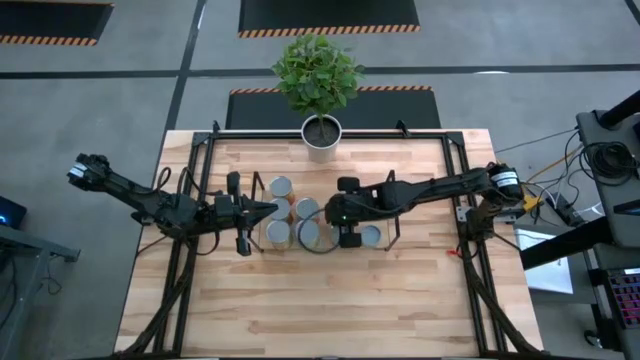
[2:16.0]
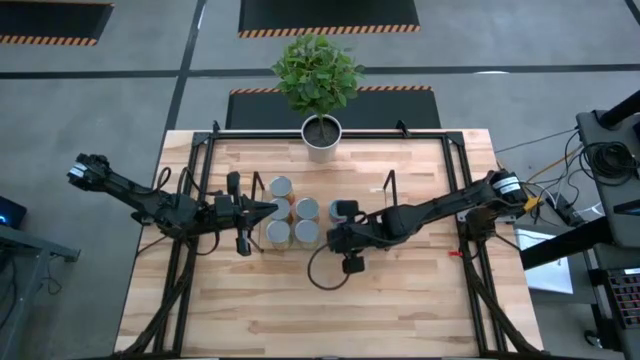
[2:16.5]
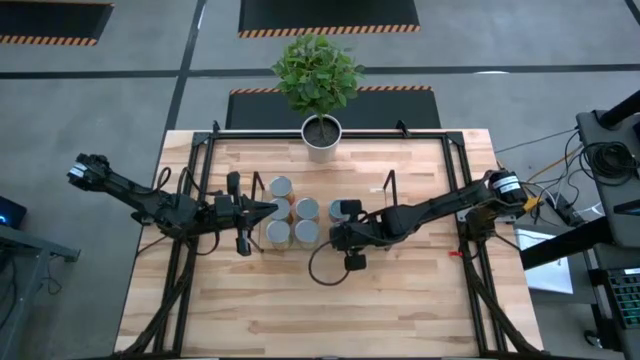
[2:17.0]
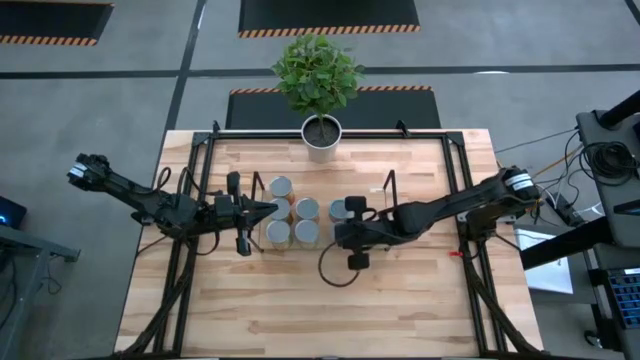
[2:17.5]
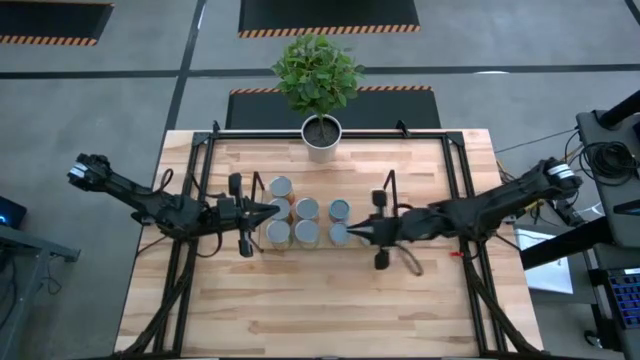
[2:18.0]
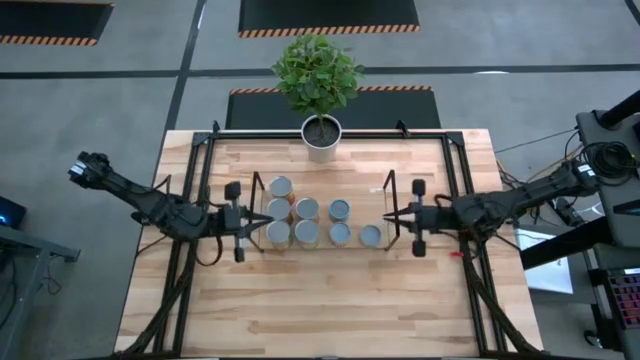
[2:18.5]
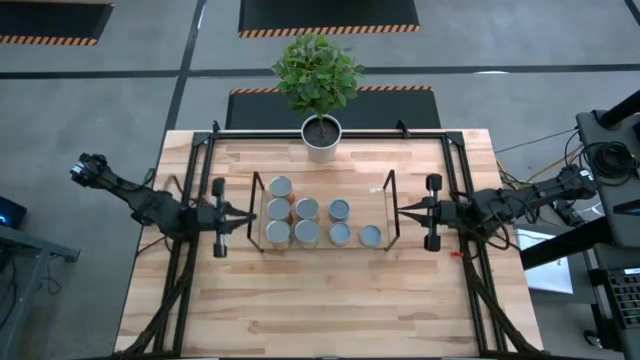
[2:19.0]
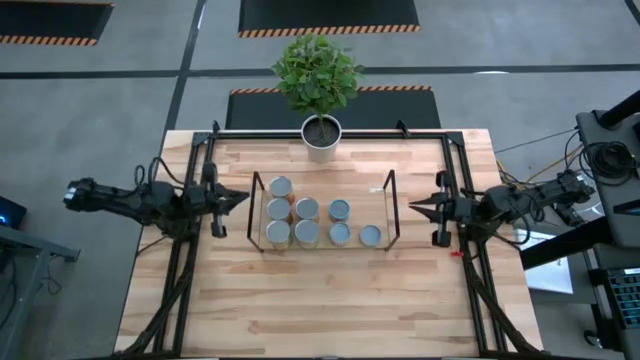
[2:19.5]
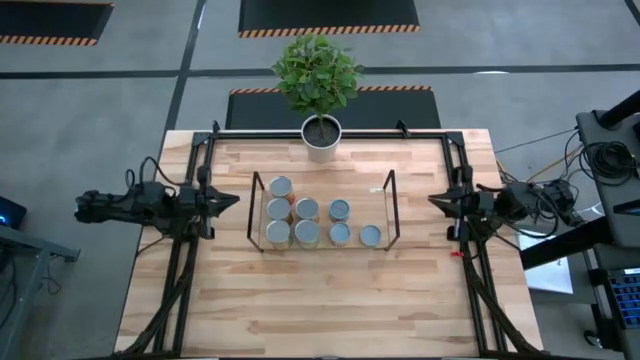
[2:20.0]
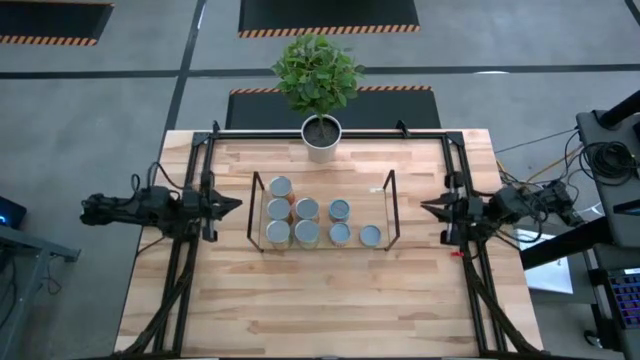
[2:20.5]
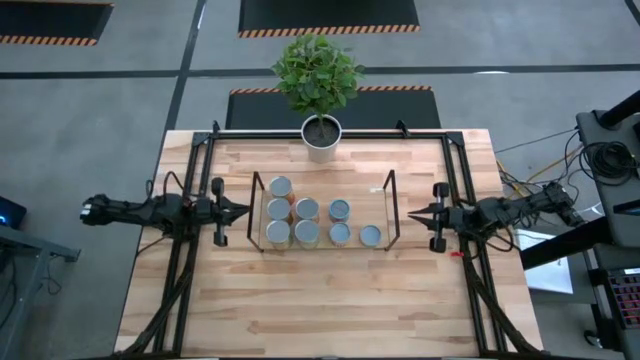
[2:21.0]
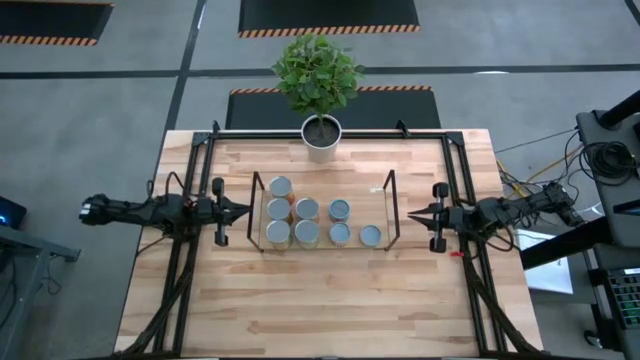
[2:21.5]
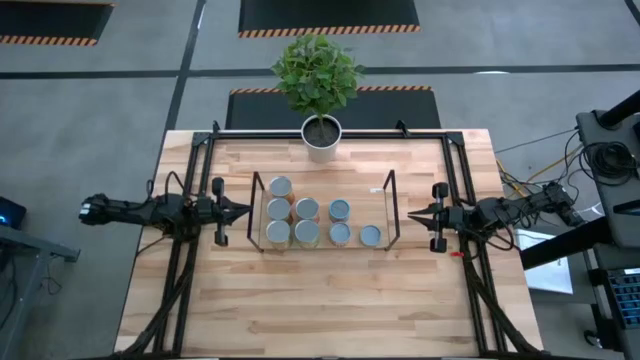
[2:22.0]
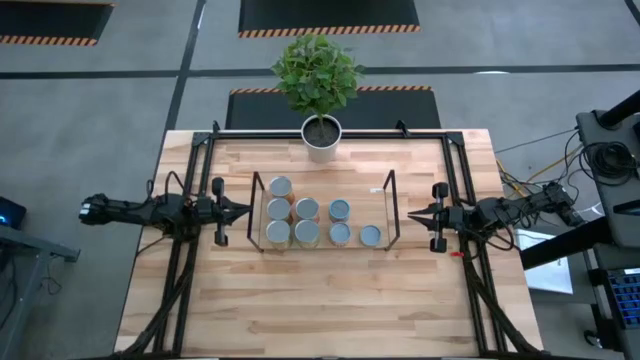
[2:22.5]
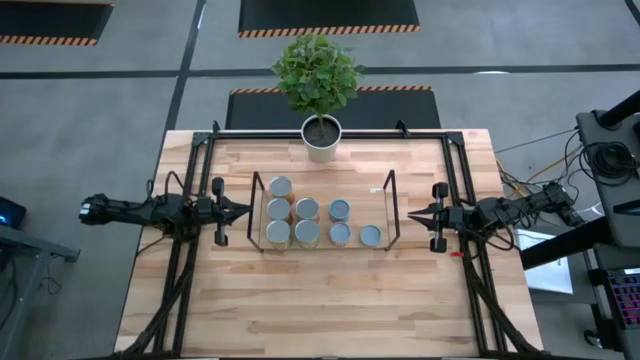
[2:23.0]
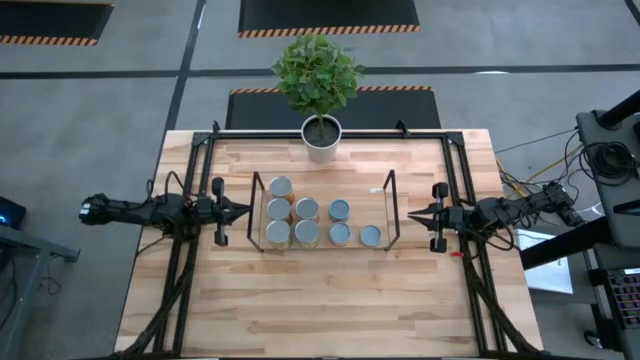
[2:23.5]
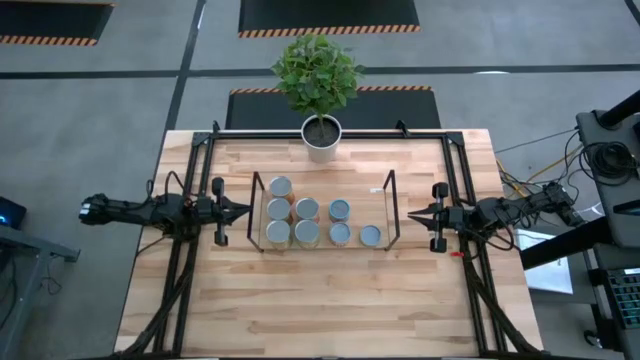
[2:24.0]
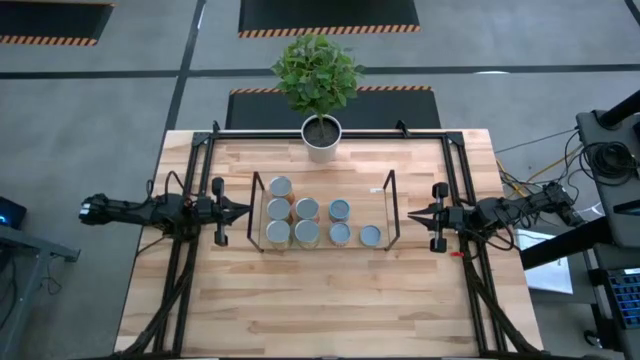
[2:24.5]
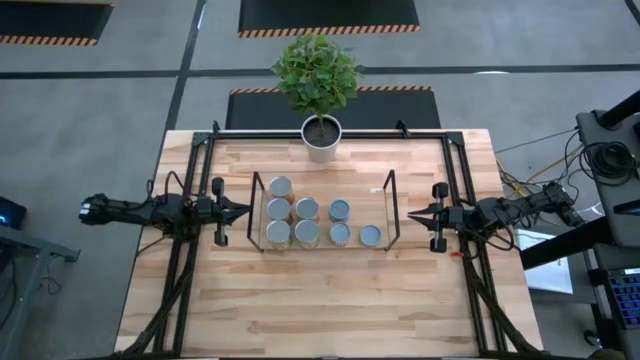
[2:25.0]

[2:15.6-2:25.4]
Task: Pick and place cans onto a shelf
Return to Home Position

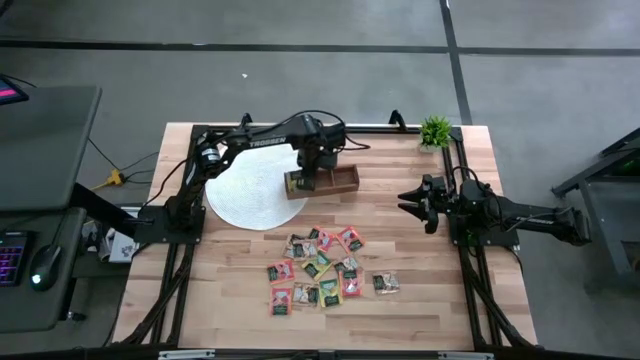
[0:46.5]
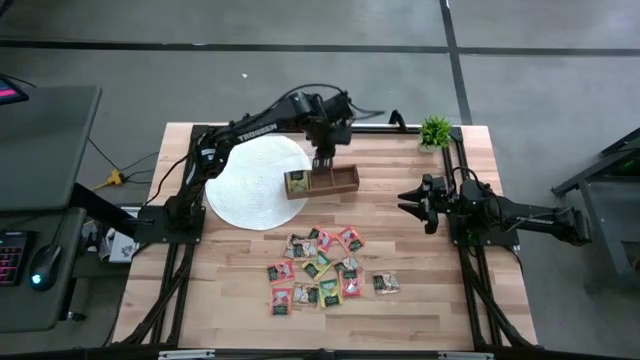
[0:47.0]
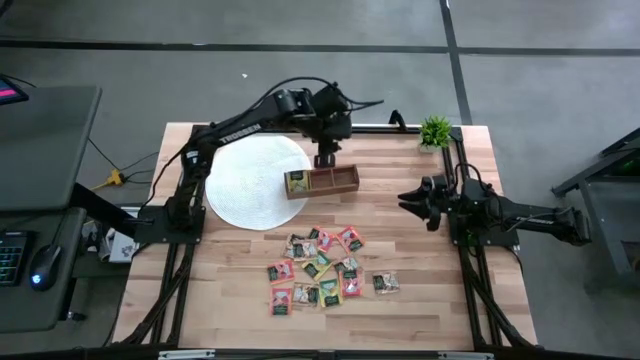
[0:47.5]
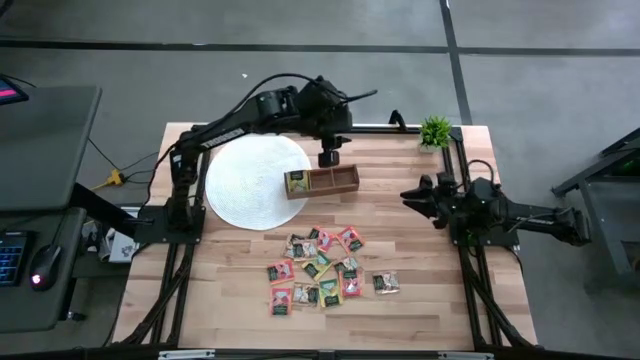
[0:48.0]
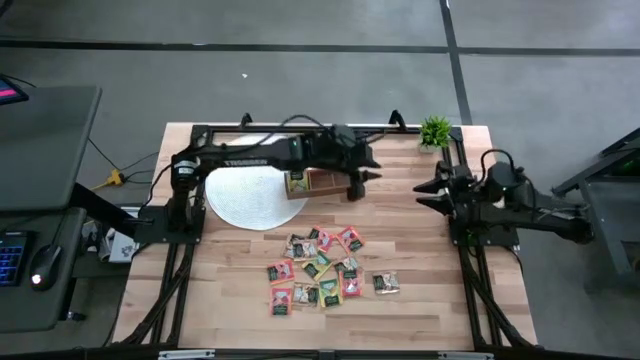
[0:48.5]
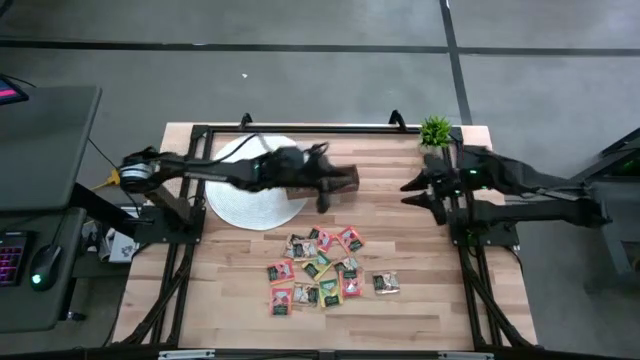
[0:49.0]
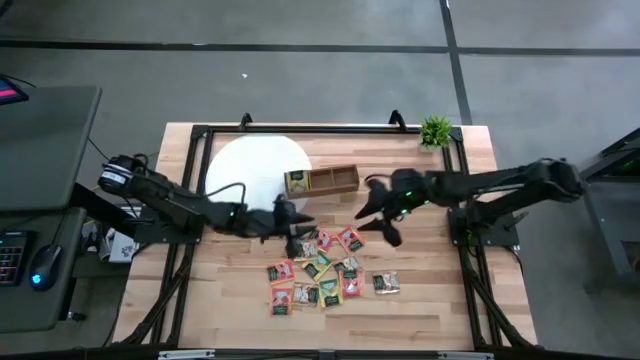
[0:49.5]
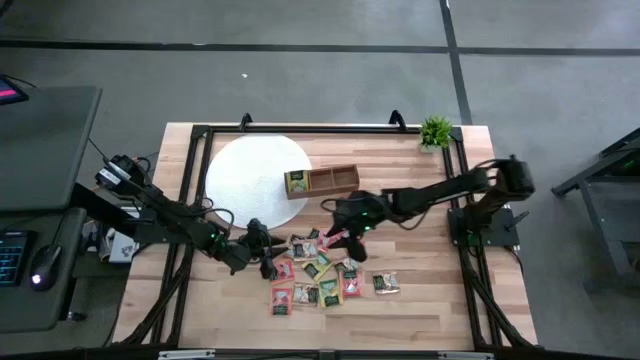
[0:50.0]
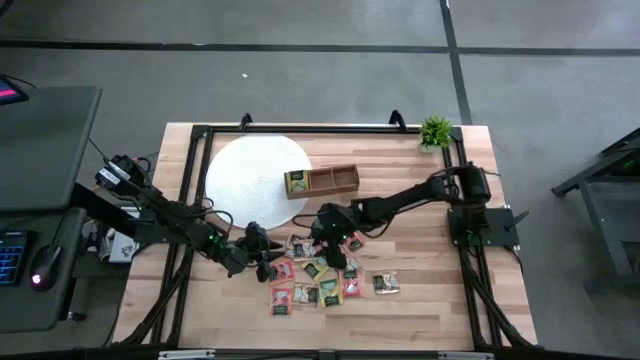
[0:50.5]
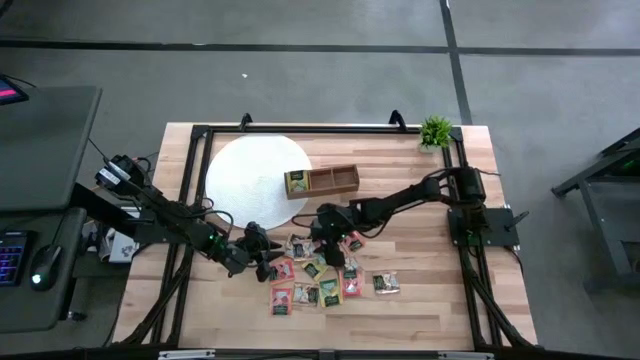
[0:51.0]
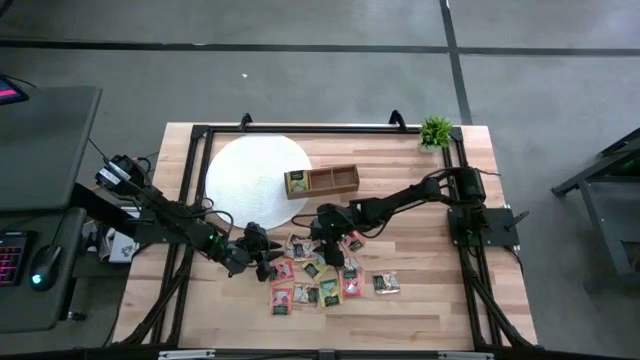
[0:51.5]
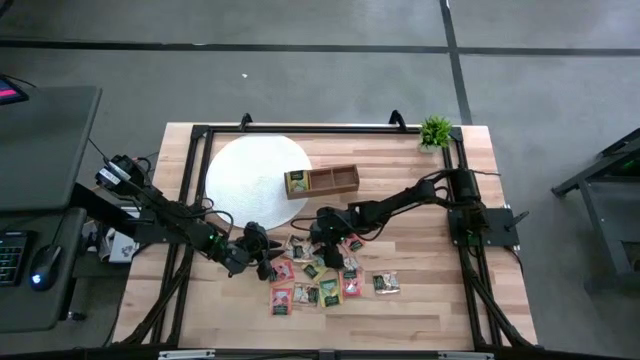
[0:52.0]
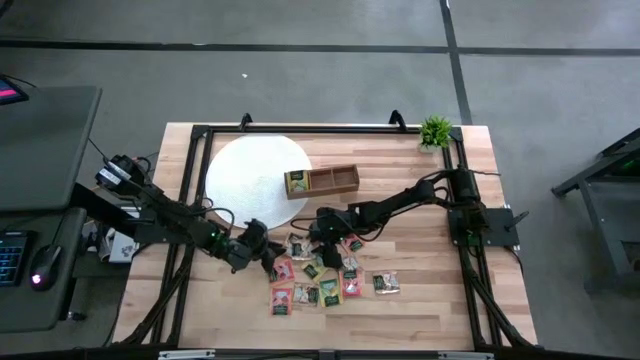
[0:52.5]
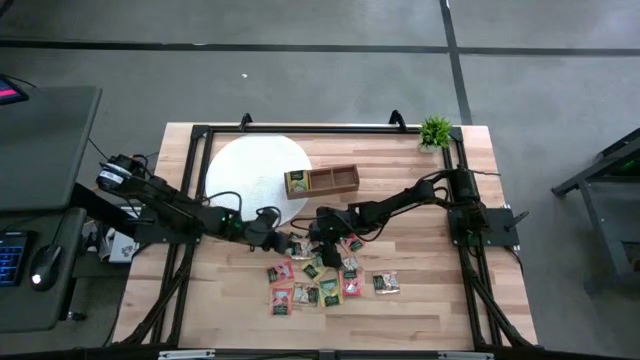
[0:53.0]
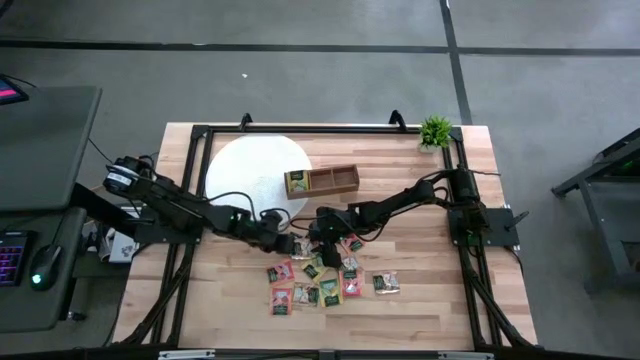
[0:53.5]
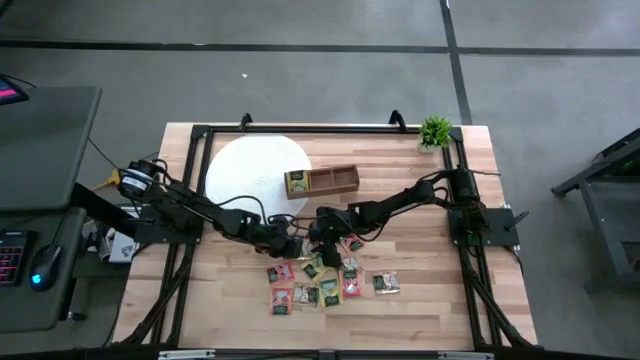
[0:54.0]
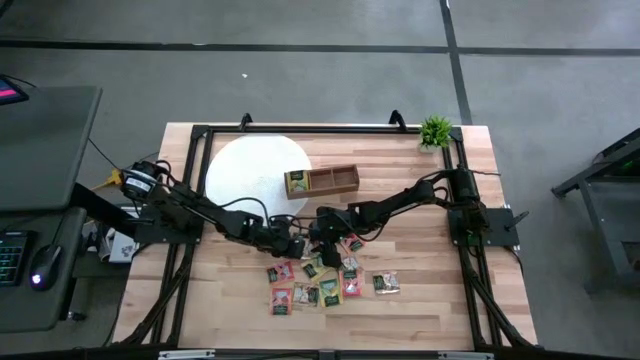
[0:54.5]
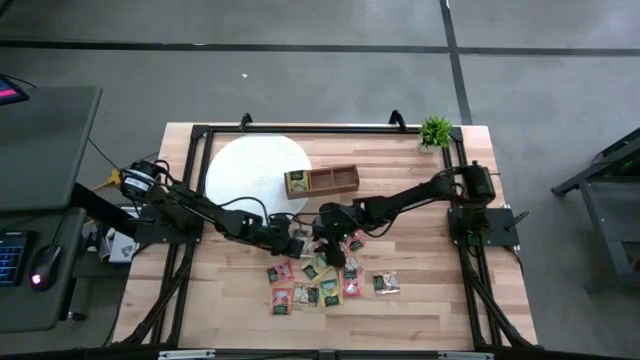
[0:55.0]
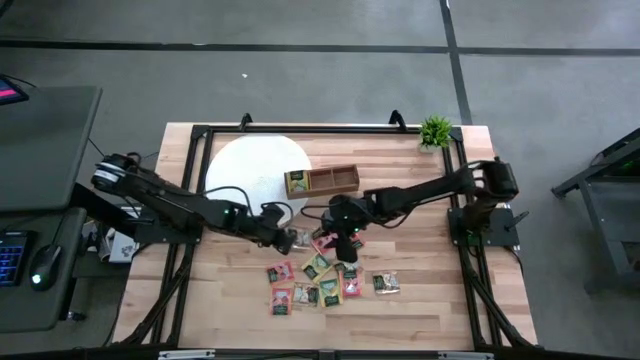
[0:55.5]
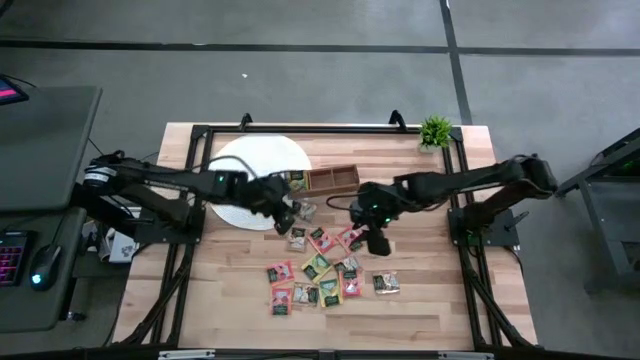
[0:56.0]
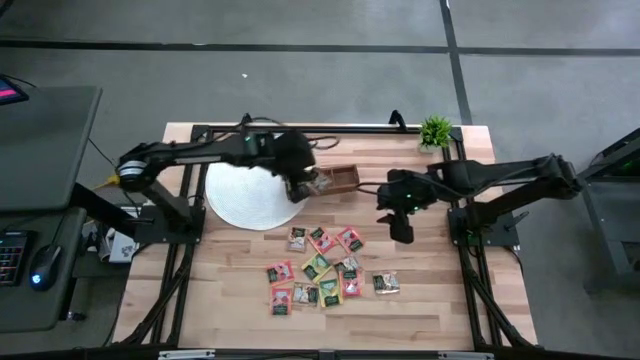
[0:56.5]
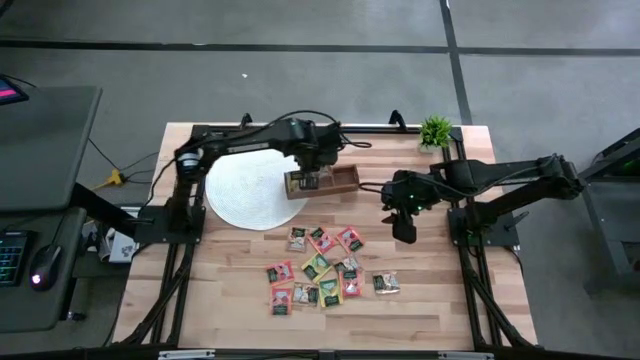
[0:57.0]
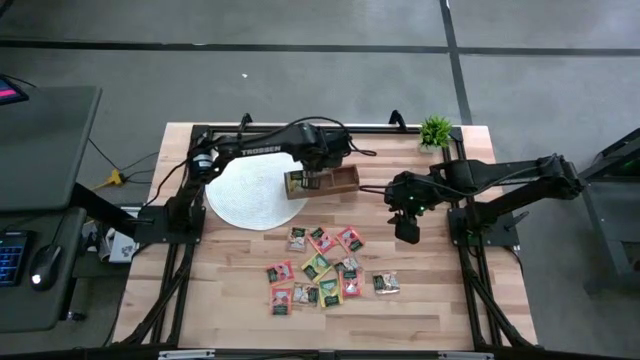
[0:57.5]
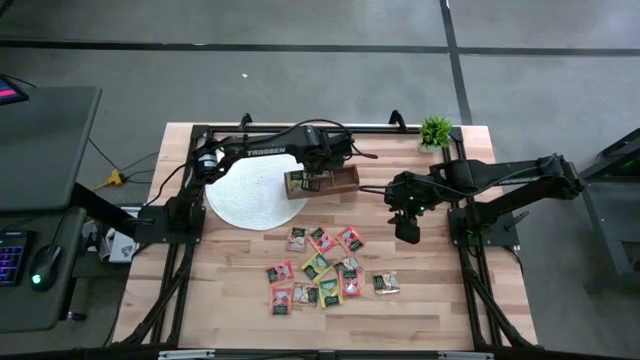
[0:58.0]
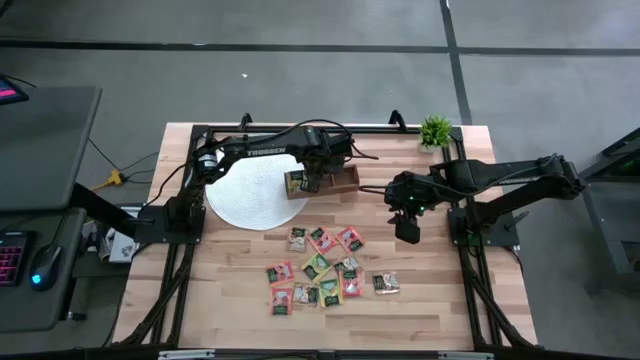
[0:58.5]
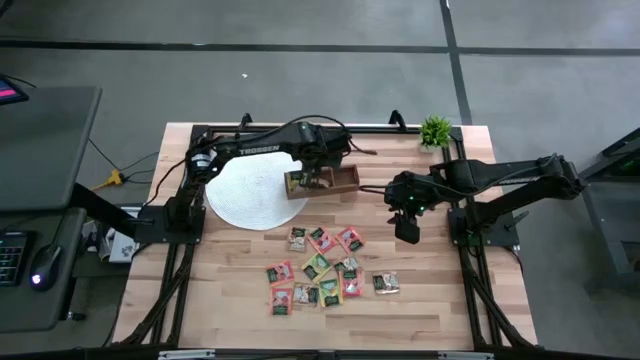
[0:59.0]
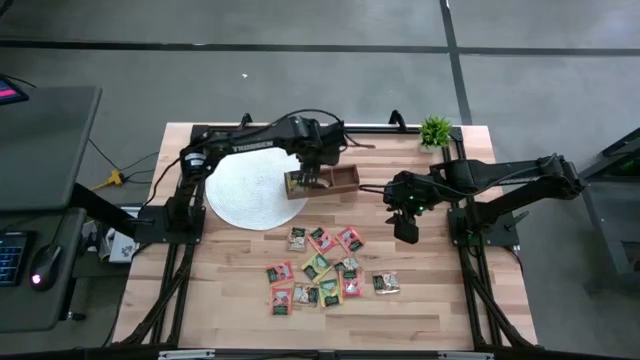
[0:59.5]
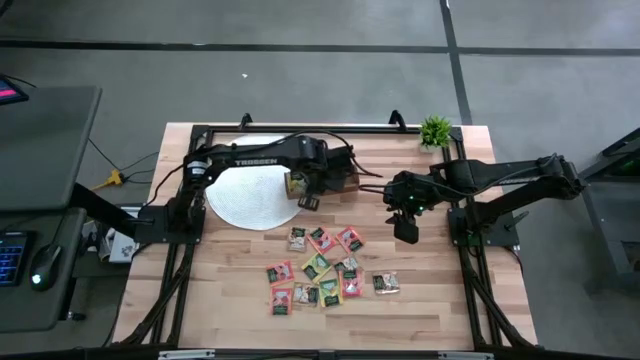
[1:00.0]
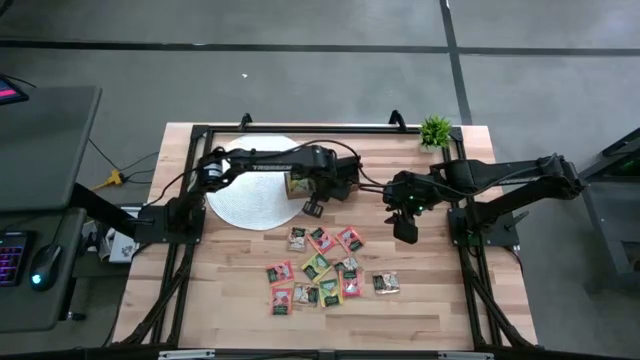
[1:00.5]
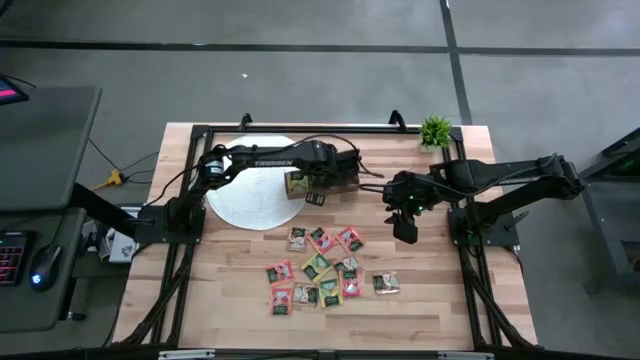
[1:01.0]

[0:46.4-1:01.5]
Task: Pick & Place Tea
Put the brown tea bag into the middle compartment of the wooden organizer
